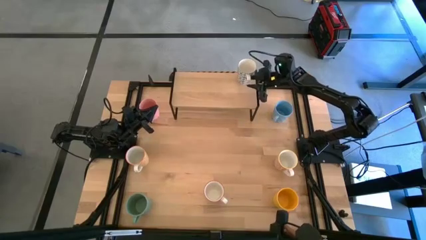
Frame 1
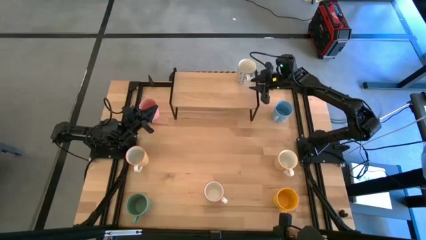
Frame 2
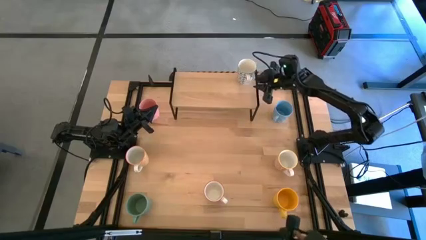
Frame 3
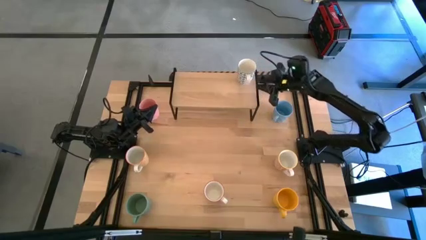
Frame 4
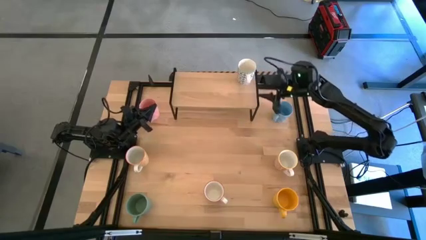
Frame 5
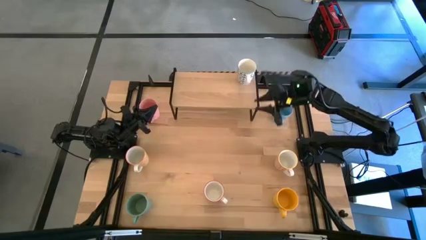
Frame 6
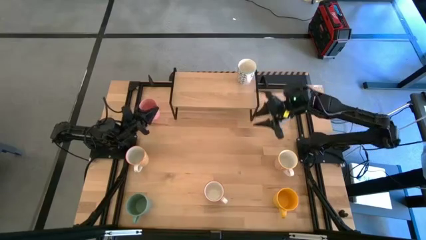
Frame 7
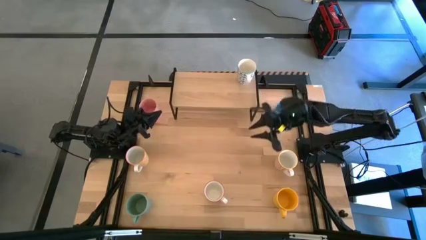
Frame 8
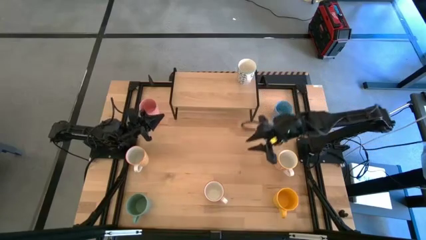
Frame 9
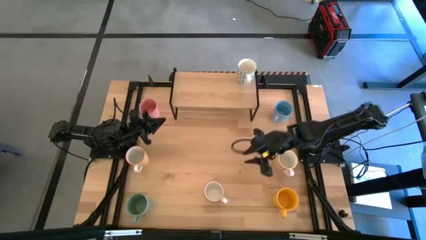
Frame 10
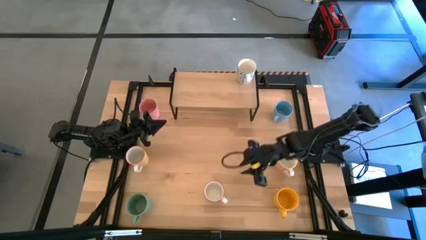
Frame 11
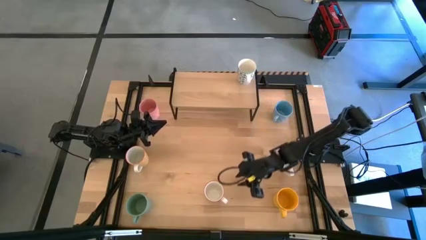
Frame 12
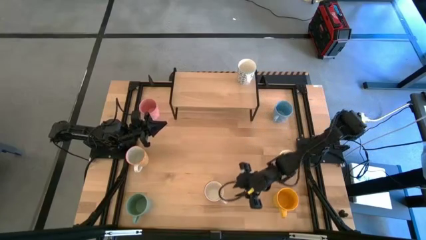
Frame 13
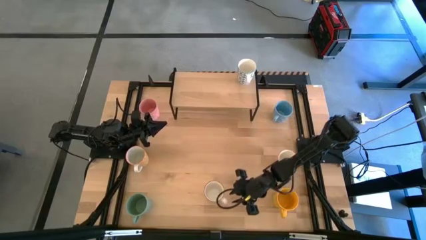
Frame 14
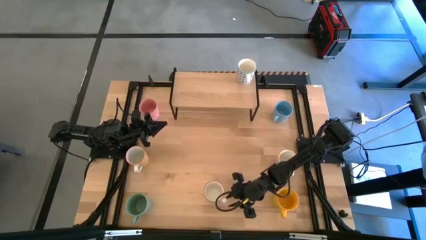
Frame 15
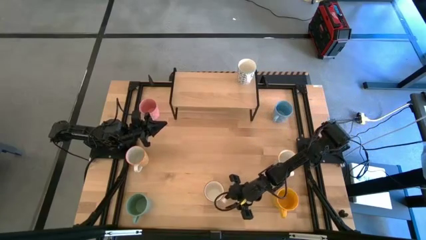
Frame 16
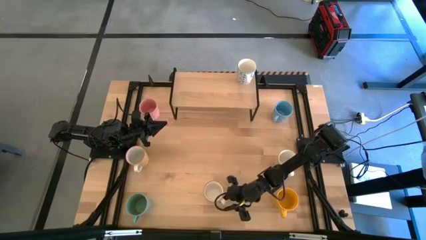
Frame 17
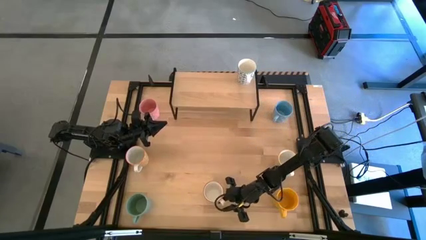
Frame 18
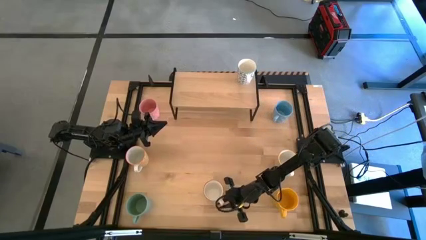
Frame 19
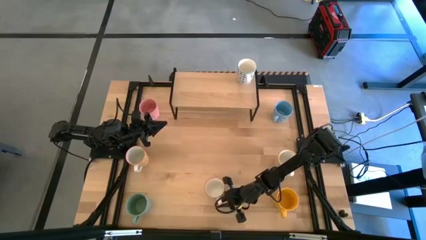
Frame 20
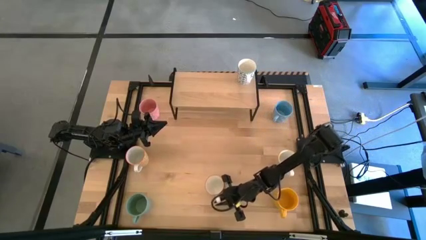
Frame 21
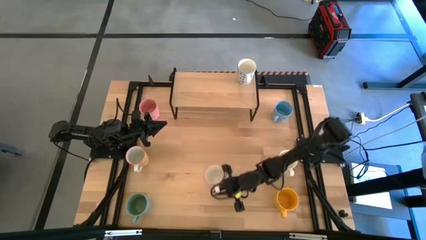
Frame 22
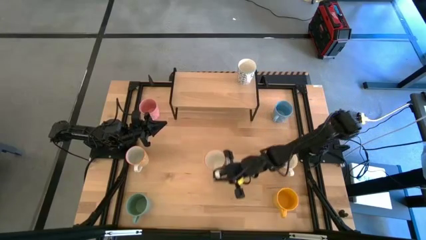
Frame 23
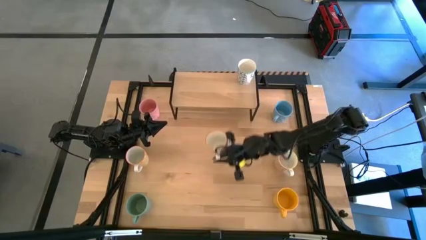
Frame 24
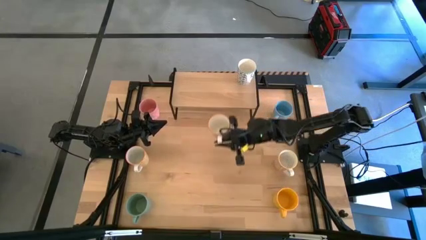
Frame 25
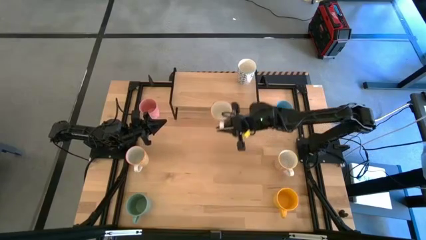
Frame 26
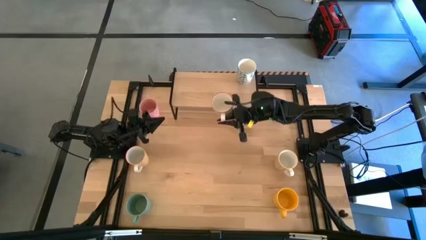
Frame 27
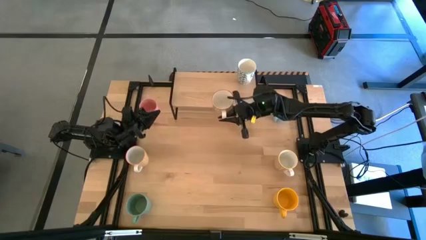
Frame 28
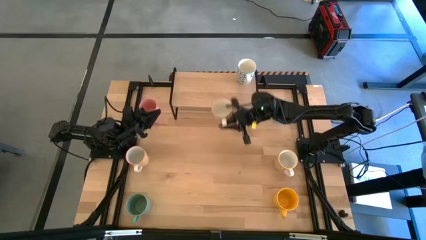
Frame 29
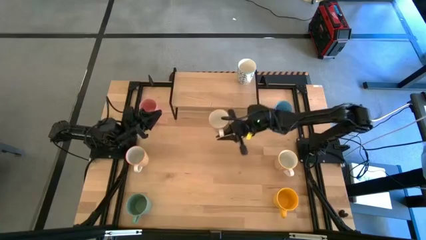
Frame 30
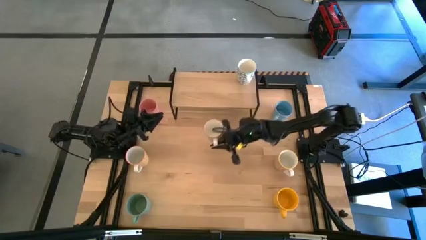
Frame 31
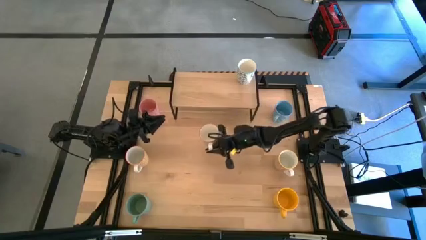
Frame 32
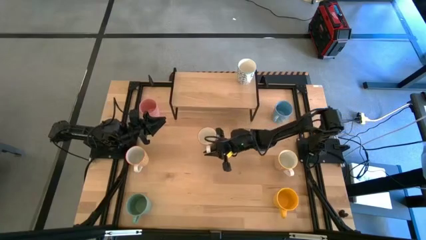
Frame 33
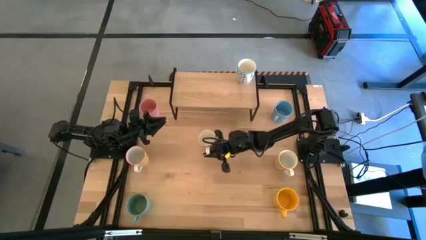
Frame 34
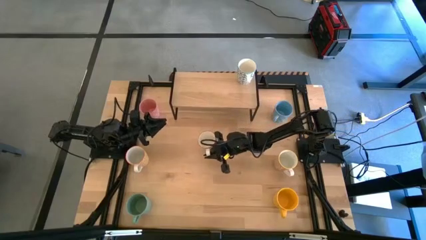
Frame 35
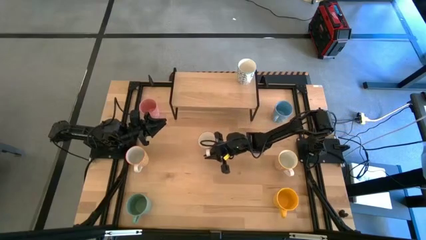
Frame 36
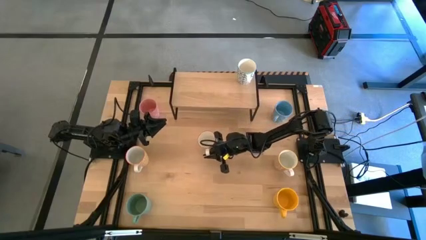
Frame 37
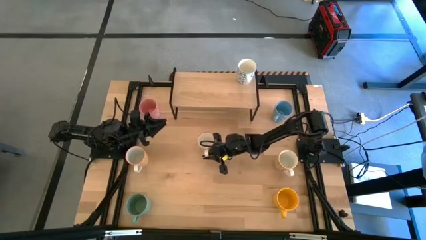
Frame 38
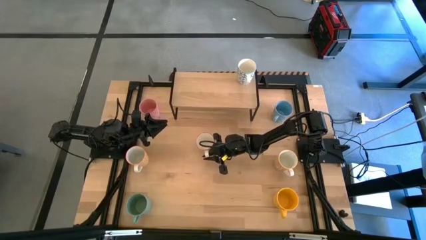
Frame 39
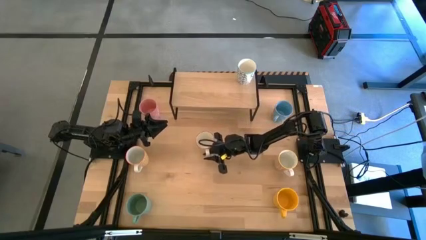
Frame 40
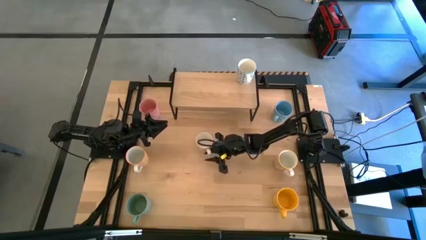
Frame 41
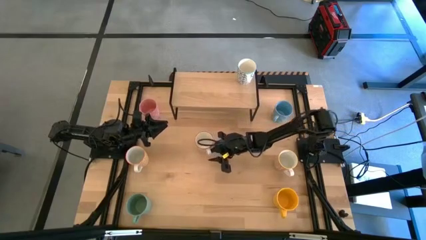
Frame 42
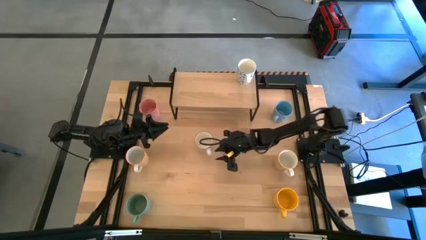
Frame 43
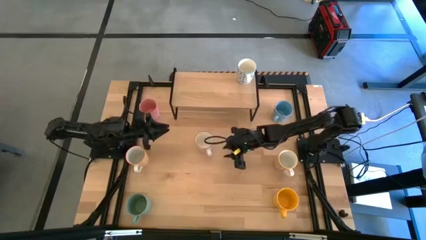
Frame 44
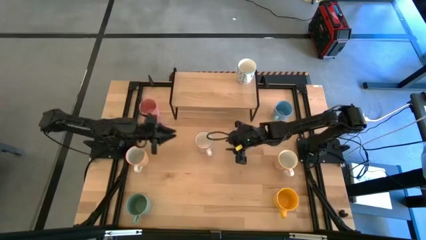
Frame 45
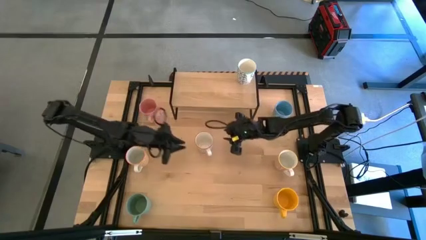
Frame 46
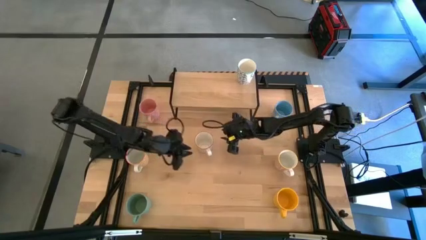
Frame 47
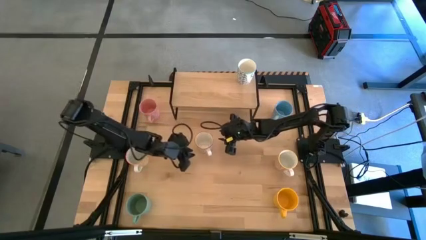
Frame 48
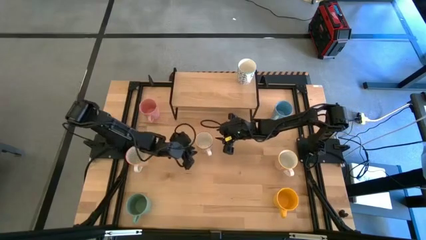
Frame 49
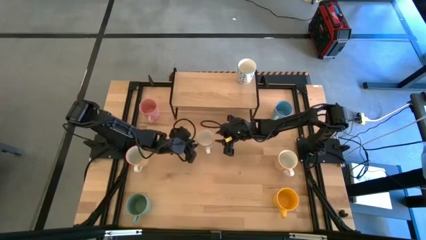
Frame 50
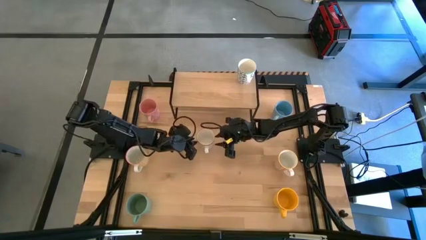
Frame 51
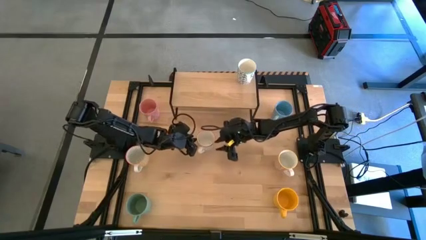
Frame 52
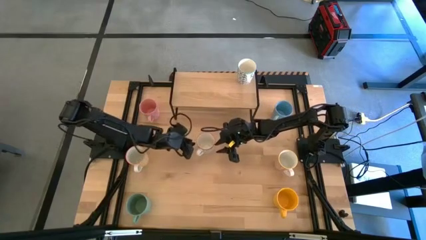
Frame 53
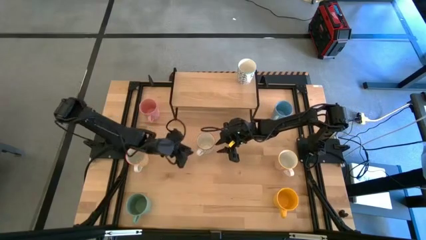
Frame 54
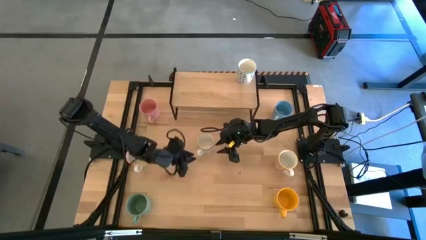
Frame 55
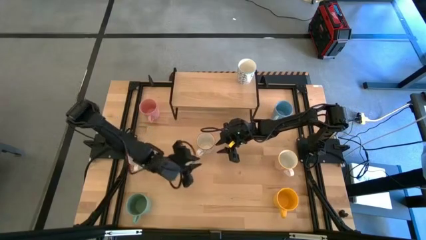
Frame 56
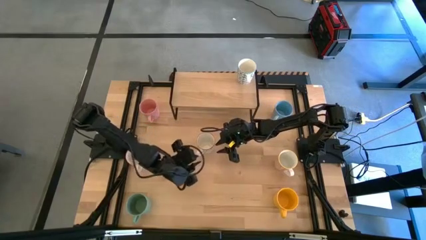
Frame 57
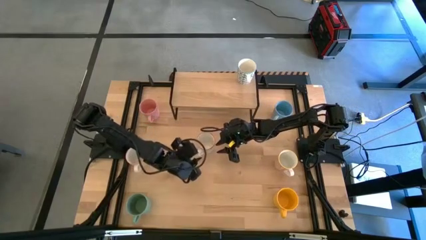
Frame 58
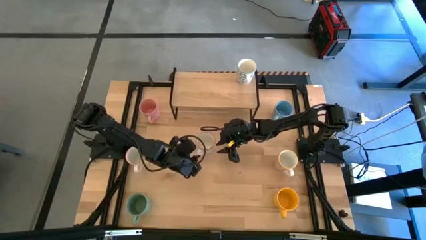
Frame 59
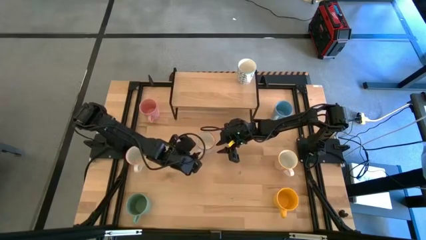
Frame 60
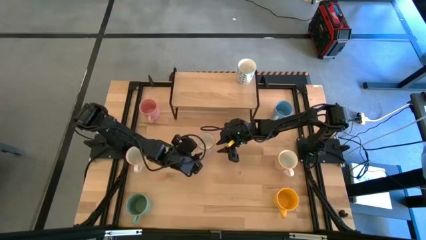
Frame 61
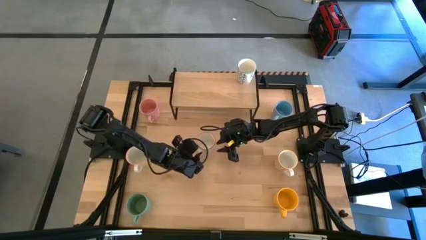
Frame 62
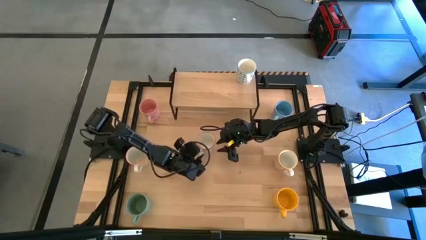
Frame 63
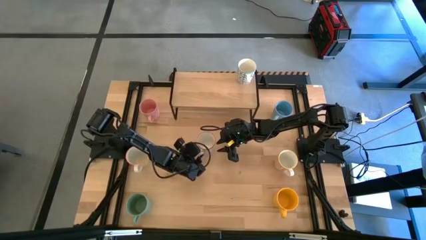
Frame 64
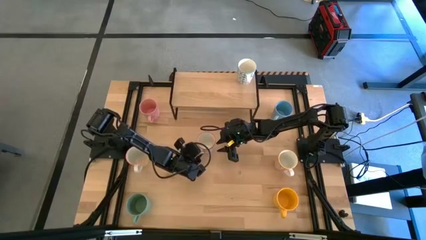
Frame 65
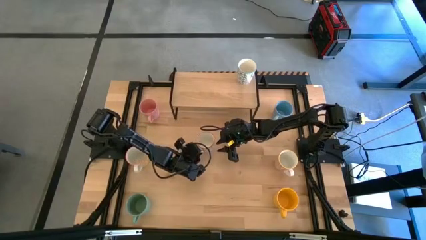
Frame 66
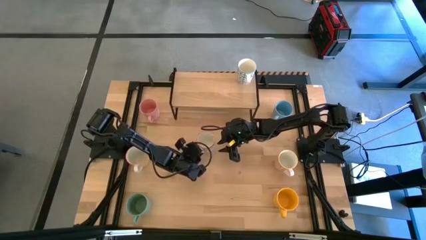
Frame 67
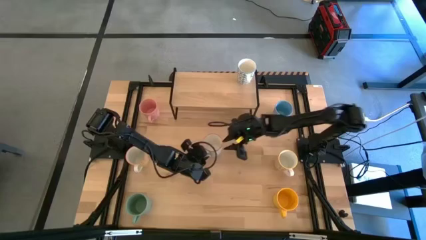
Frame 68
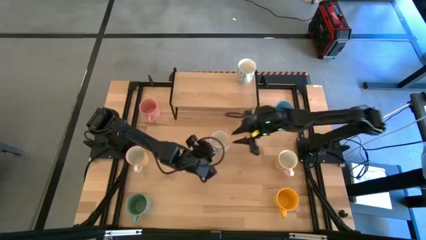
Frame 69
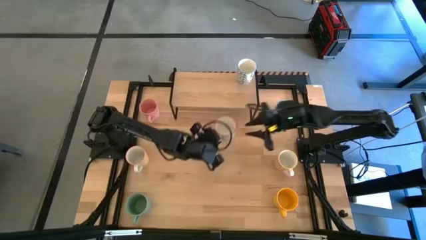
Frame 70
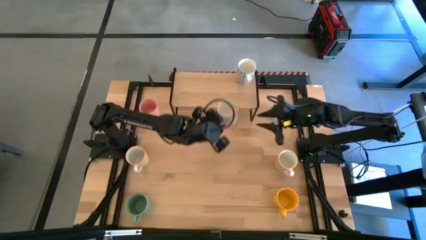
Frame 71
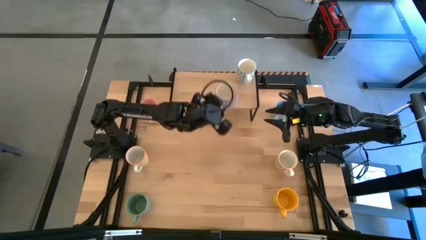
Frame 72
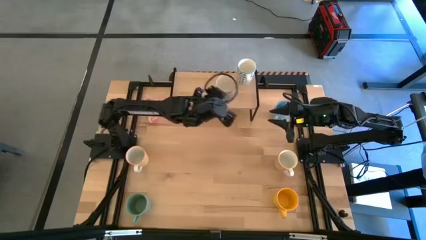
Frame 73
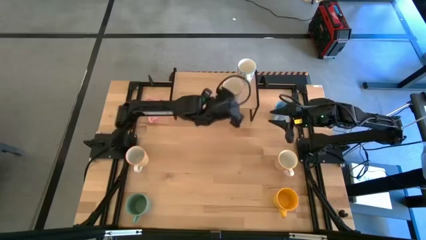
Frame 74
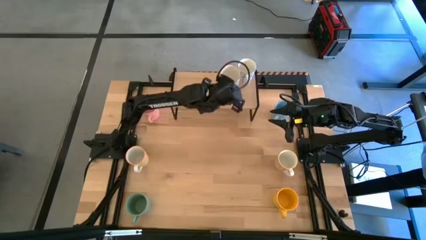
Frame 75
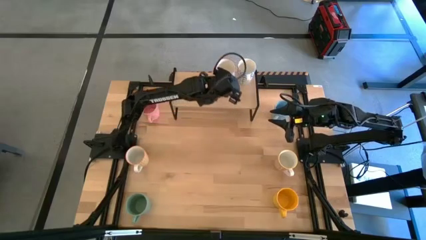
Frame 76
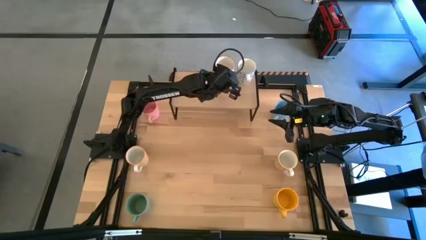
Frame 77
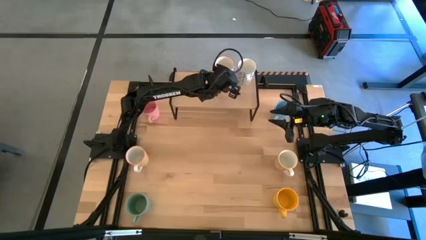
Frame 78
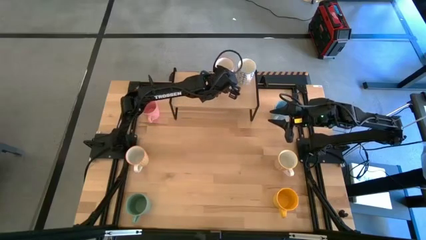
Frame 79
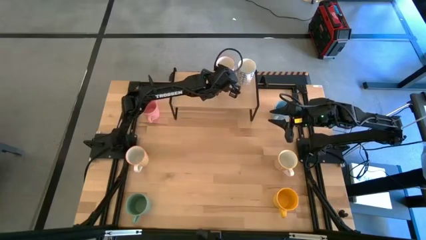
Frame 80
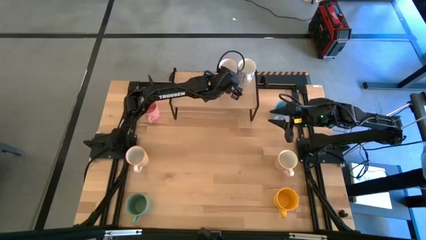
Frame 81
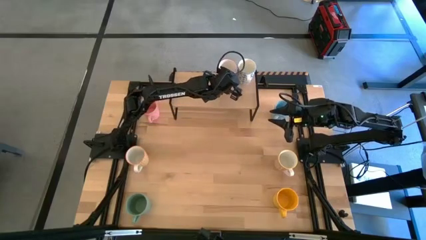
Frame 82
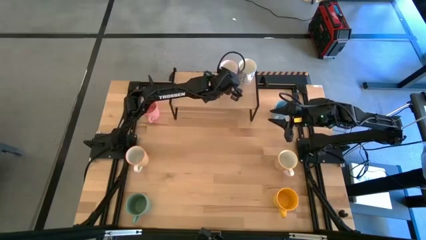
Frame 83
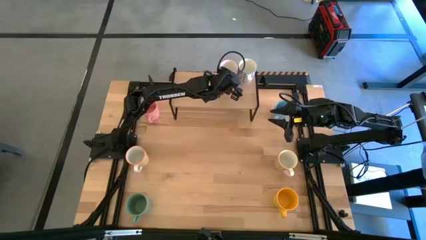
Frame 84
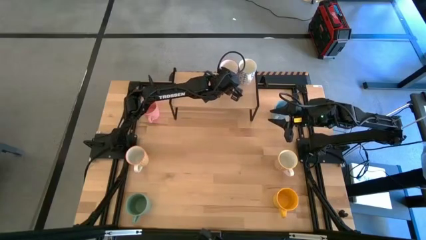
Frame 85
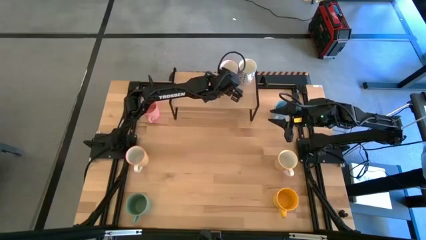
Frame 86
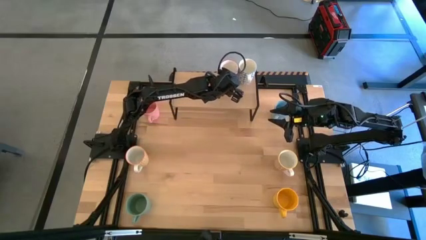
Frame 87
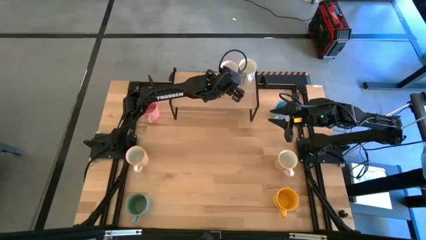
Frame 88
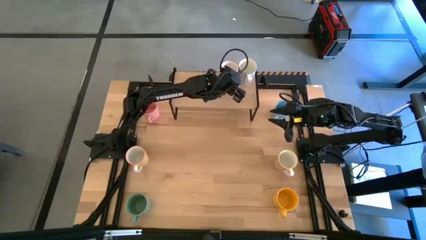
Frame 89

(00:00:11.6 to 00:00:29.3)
Task: Place coffee mugs
Put the gray patterned mug on the shelf
